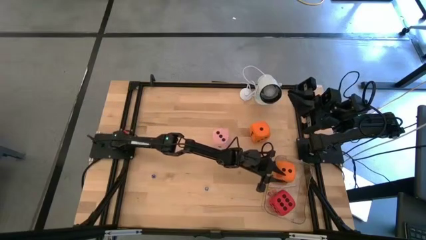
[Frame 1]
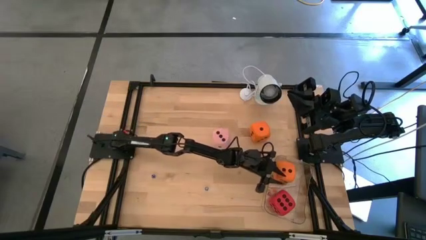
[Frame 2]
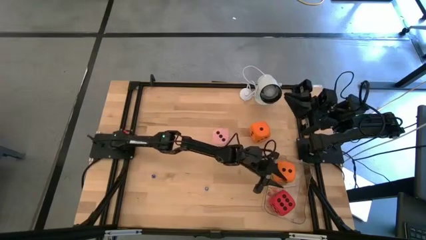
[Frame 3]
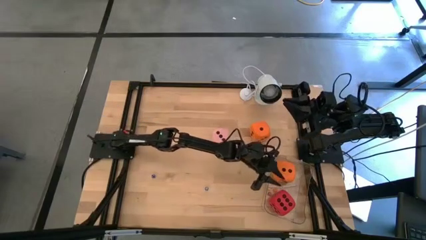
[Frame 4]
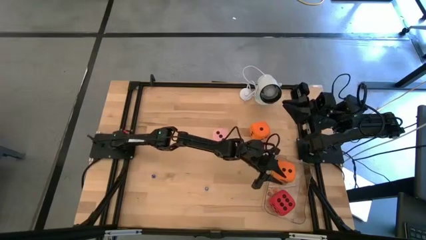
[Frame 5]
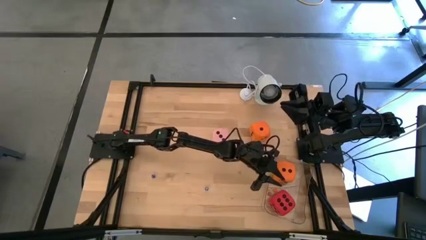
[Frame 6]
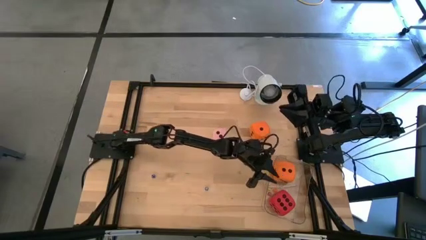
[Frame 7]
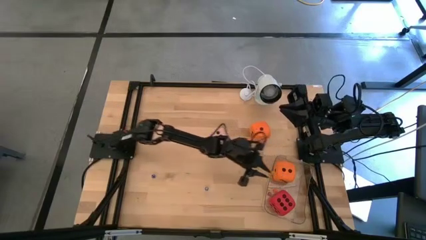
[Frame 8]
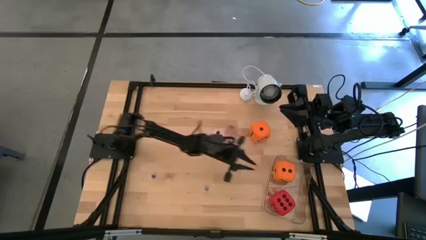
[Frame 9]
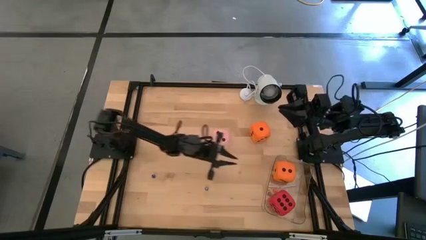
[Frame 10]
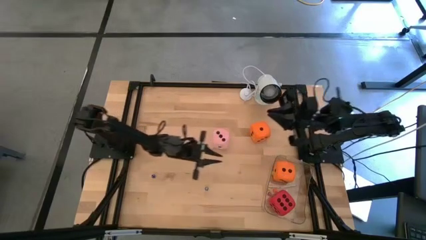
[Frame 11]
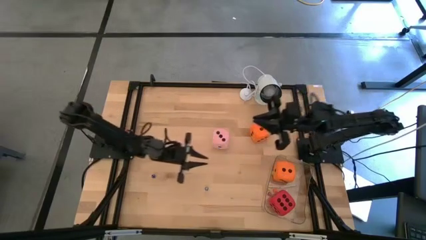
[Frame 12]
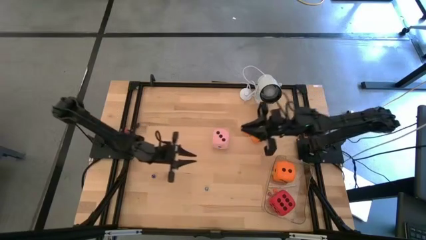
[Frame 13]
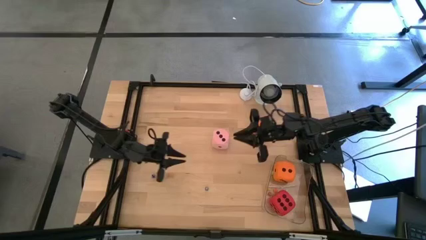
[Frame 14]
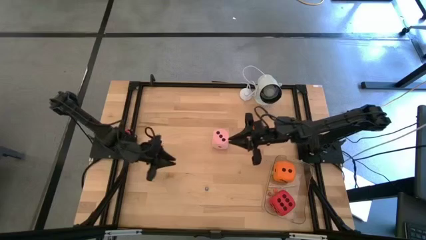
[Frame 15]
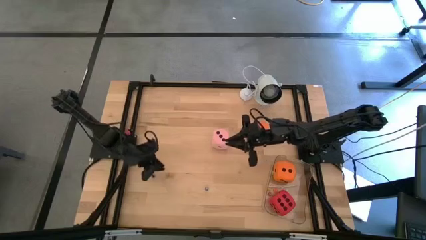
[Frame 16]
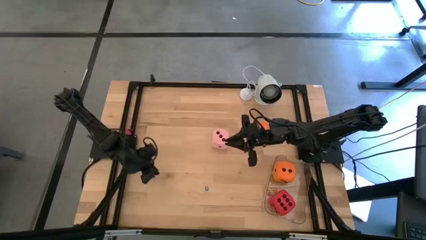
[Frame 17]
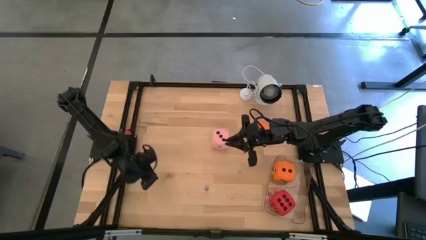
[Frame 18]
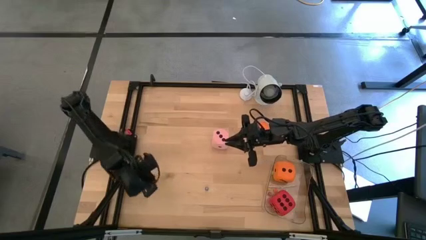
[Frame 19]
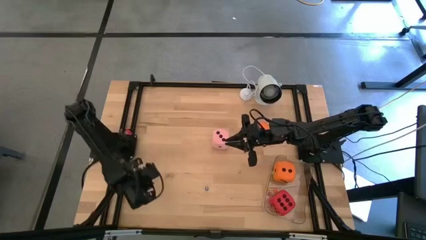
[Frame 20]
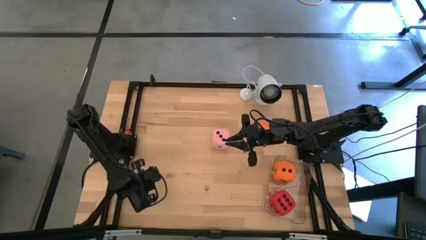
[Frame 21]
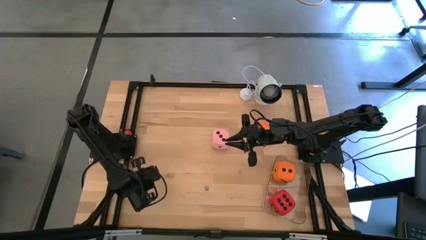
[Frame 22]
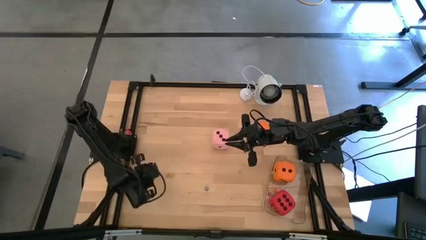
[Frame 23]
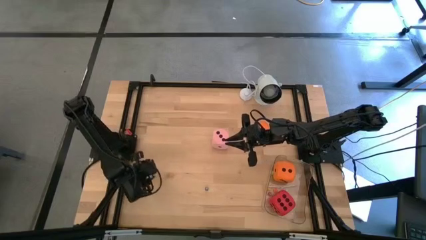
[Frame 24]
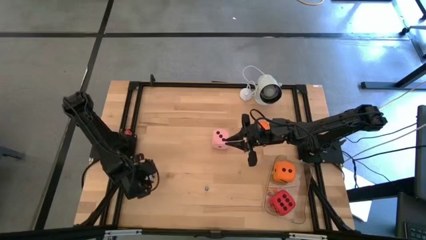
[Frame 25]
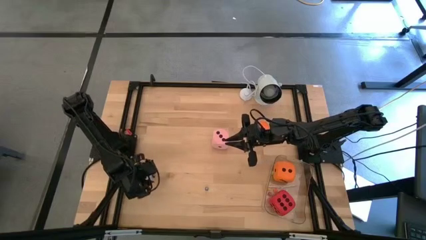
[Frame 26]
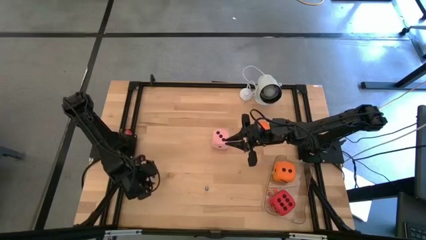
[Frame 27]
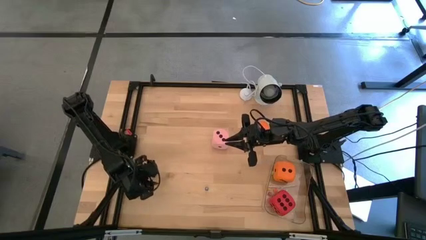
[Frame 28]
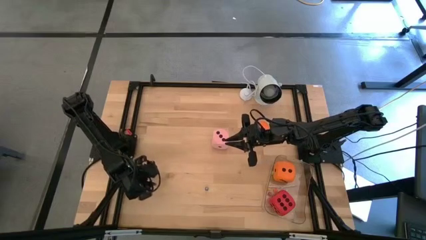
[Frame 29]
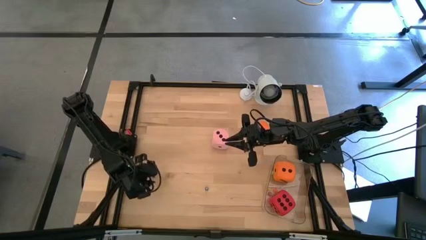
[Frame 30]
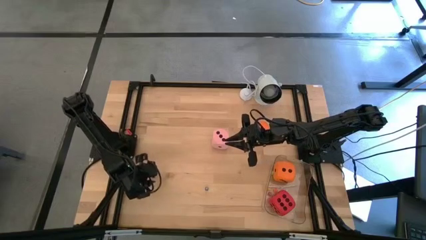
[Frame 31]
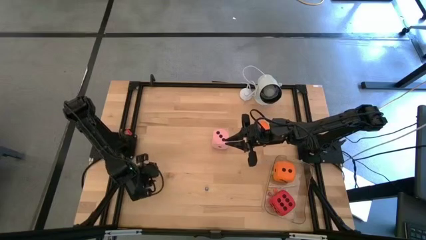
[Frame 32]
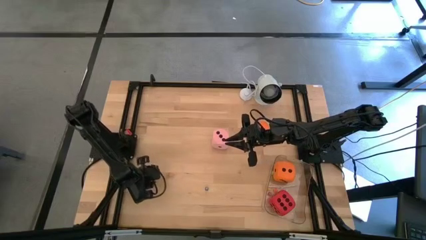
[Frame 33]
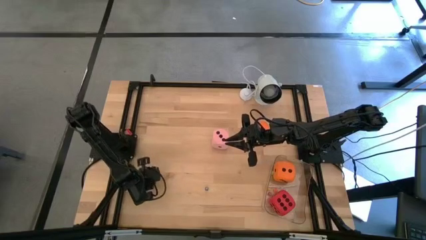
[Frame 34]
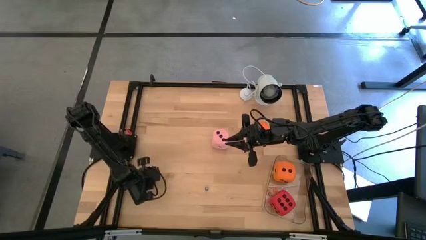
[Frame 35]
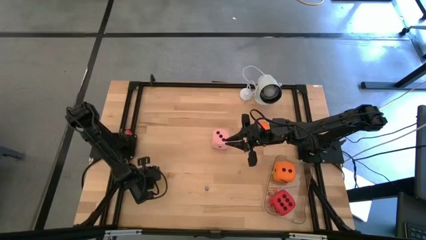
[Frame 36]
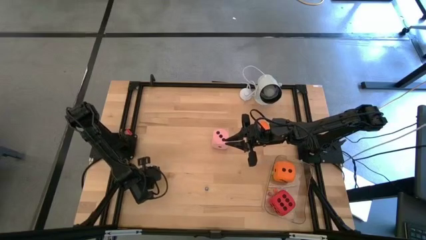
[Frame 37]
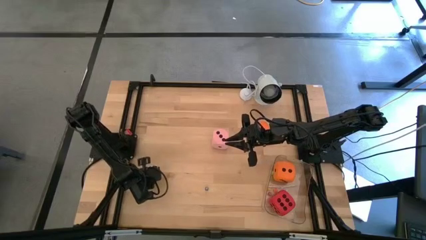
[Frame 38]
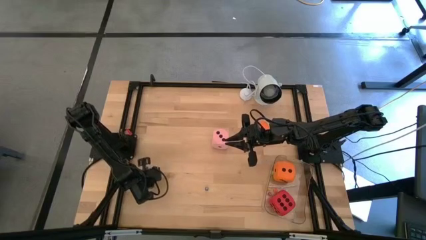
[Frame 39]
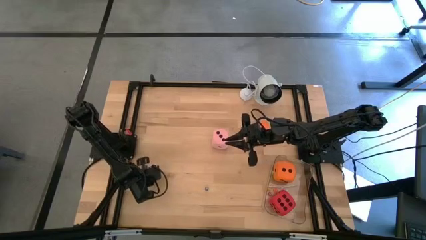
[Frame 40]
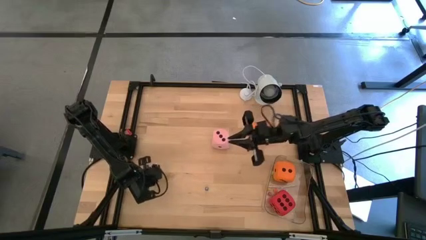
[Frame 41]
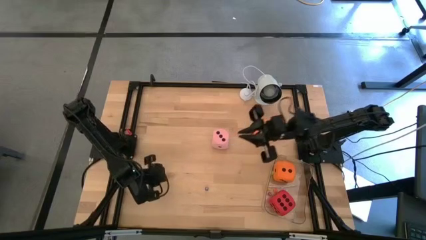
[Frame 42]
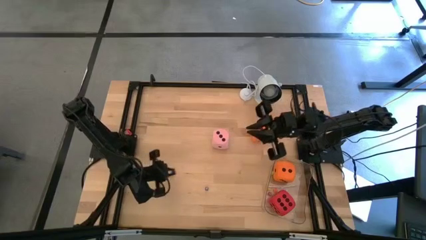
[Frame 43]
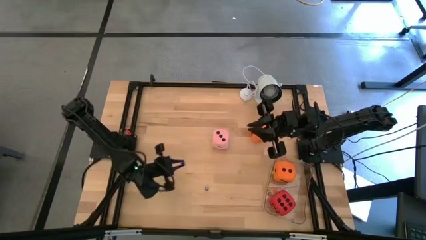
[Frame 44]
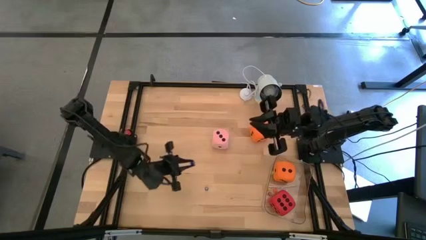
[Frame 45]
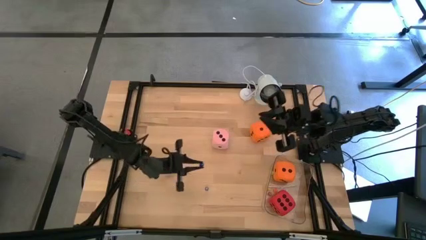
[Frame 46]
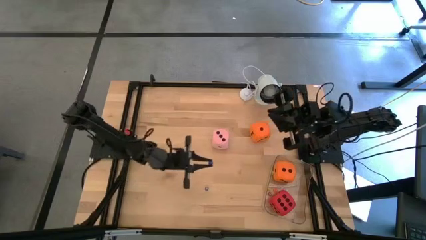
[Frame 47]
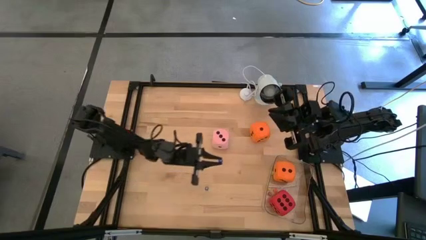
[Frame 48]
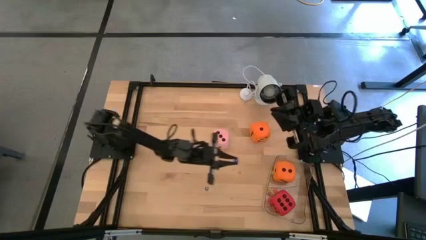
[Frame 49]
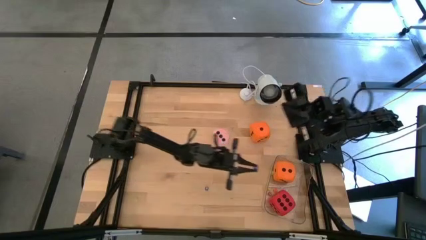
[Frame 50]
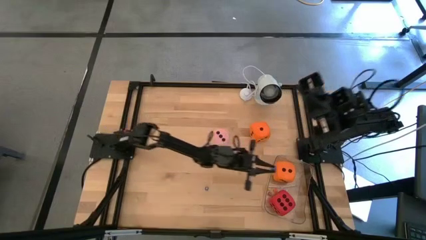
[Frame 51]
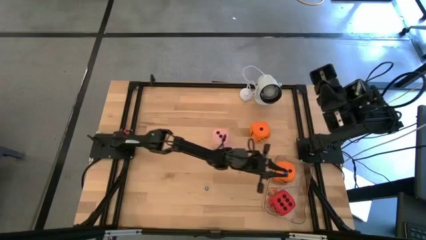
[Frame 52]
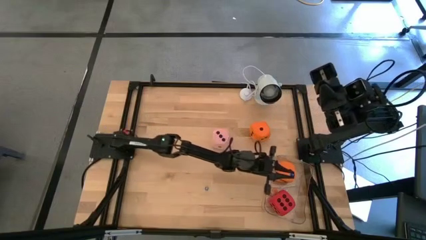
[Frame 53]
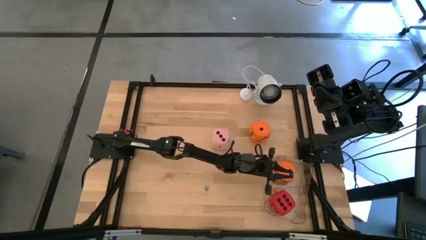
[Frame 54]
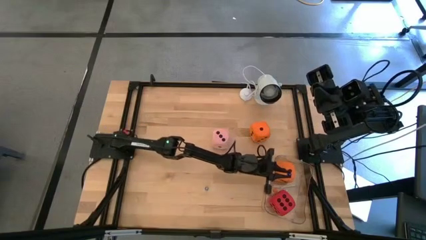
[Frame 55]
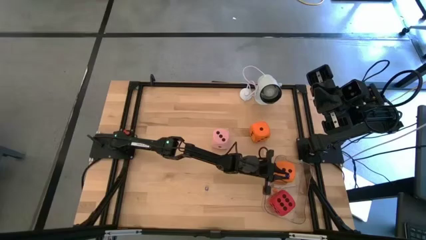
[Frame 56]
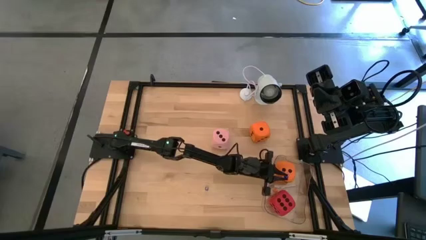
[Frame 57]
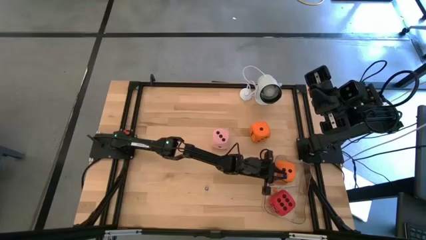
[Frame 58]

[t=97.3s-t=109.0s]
Task: Pick & Place Dice
Put the left small blue die into the transparent container
